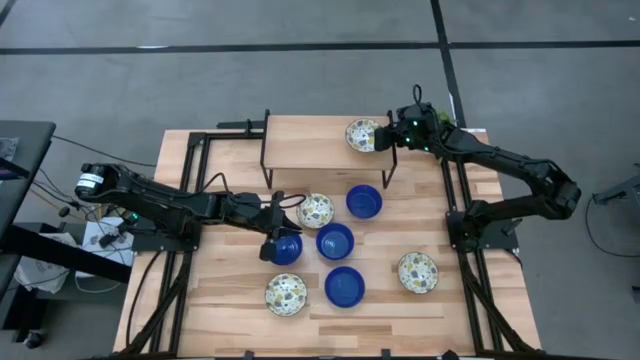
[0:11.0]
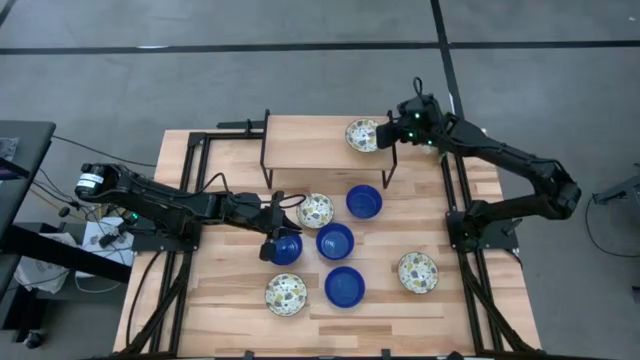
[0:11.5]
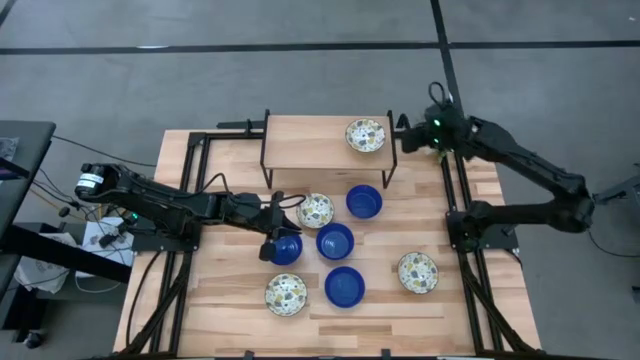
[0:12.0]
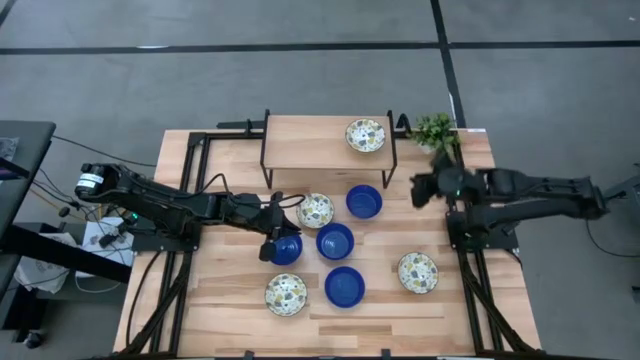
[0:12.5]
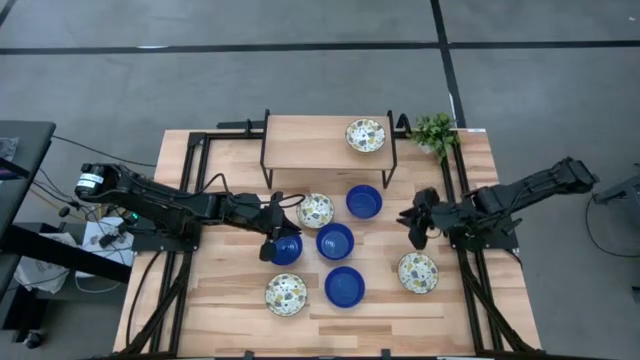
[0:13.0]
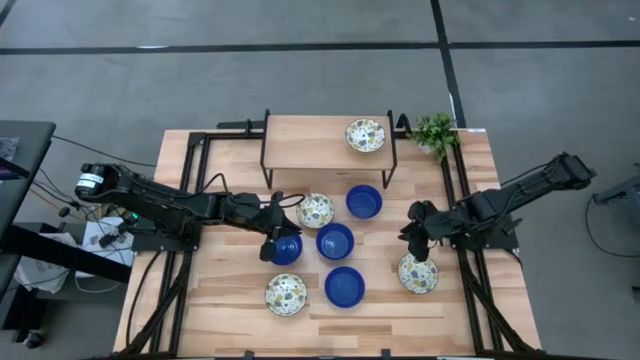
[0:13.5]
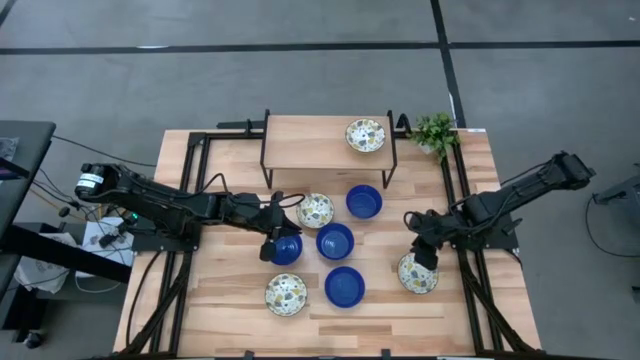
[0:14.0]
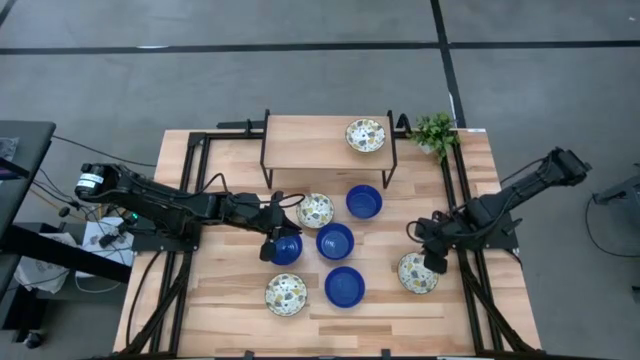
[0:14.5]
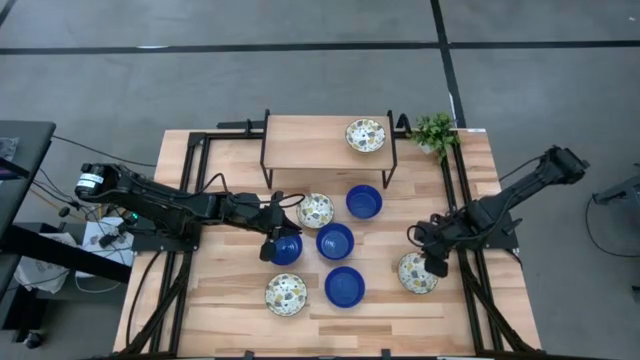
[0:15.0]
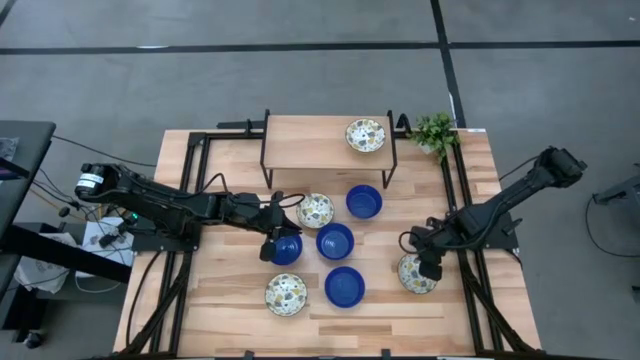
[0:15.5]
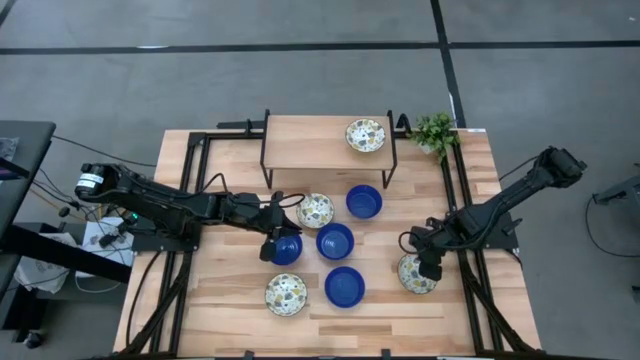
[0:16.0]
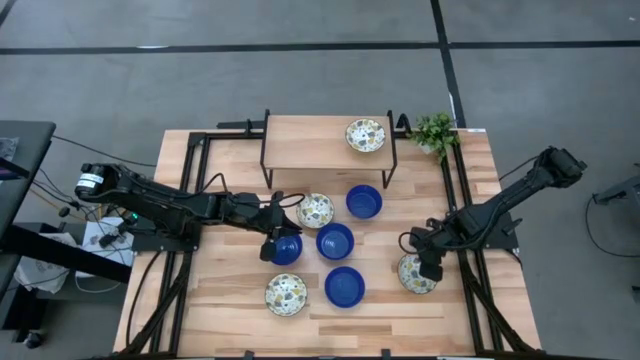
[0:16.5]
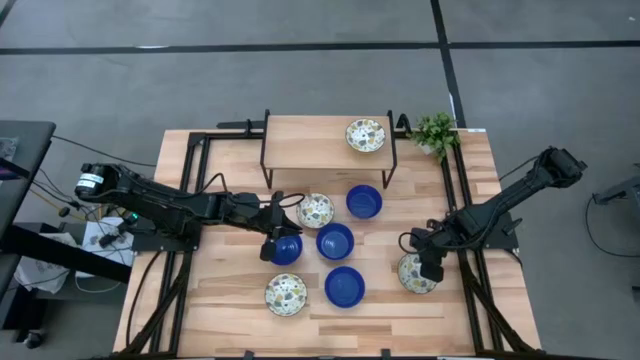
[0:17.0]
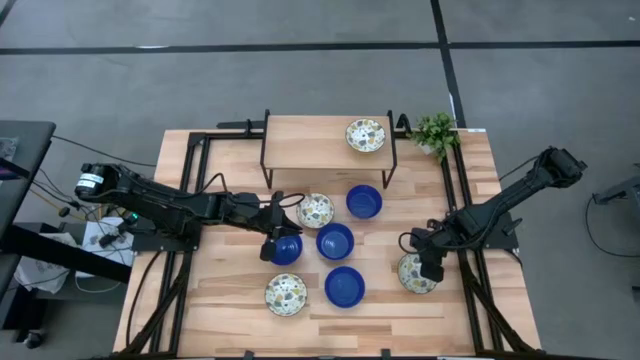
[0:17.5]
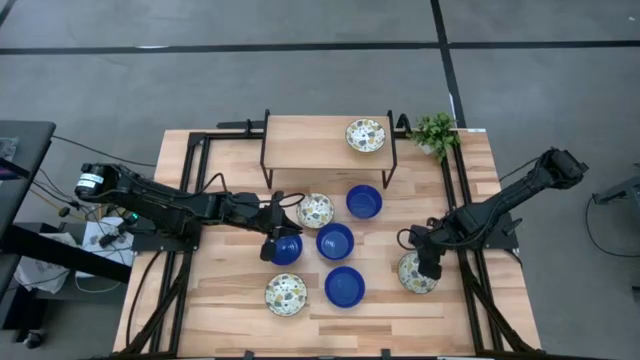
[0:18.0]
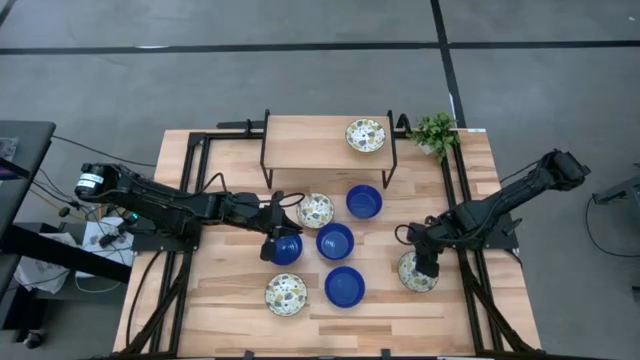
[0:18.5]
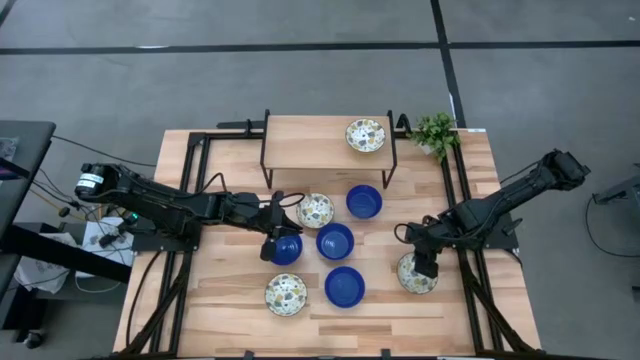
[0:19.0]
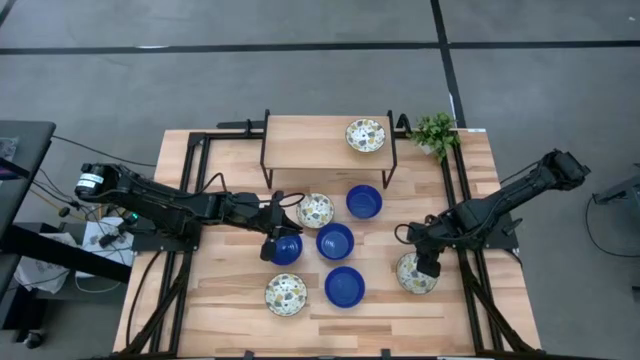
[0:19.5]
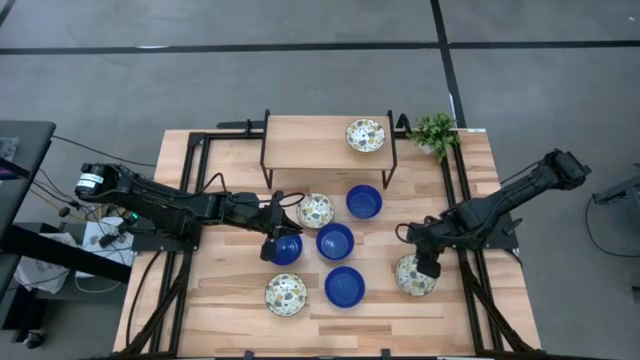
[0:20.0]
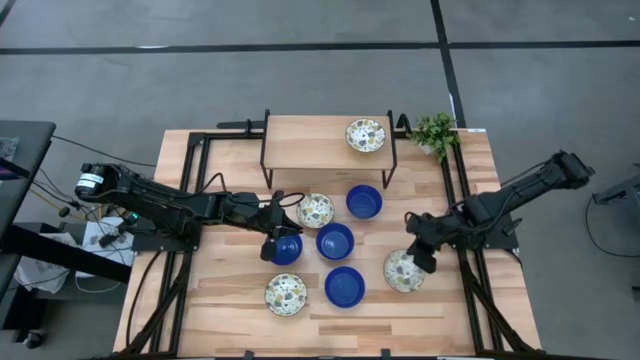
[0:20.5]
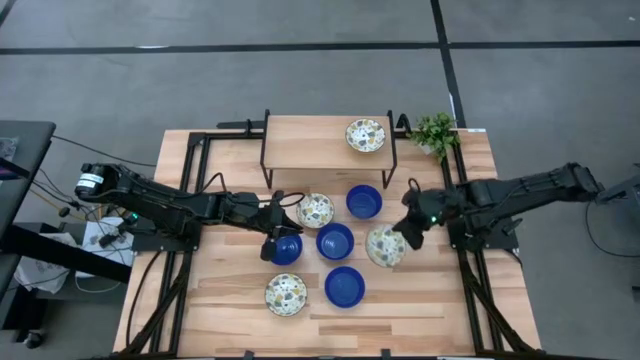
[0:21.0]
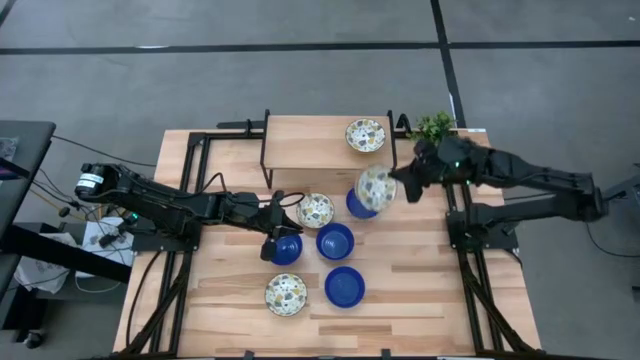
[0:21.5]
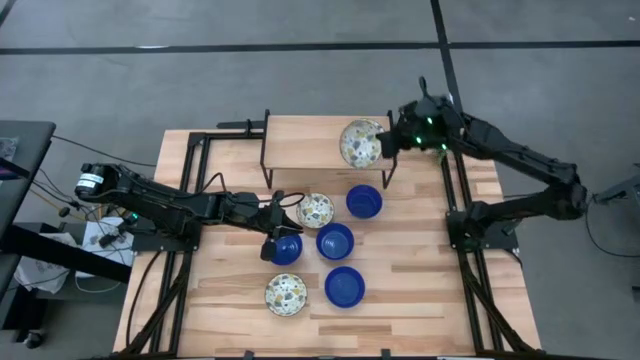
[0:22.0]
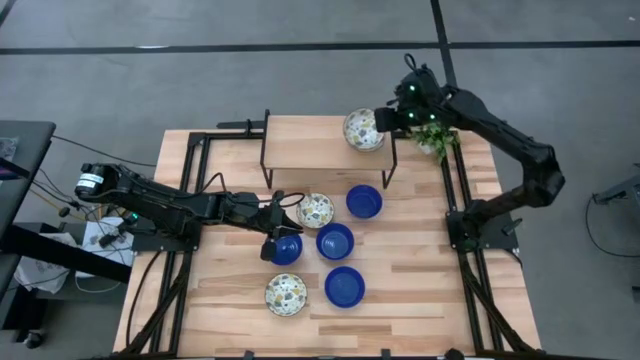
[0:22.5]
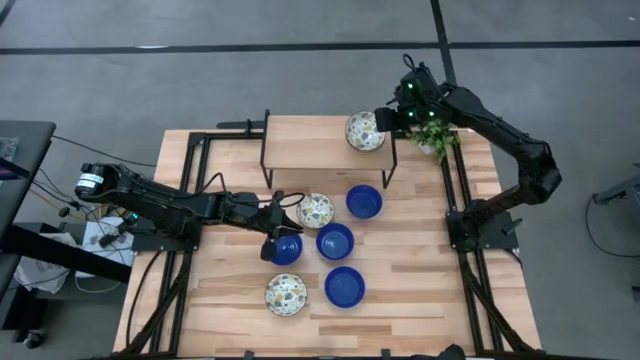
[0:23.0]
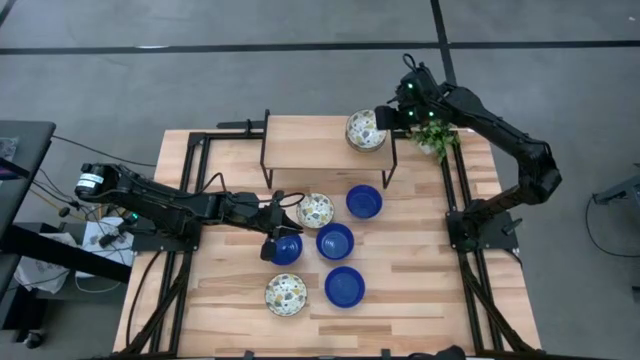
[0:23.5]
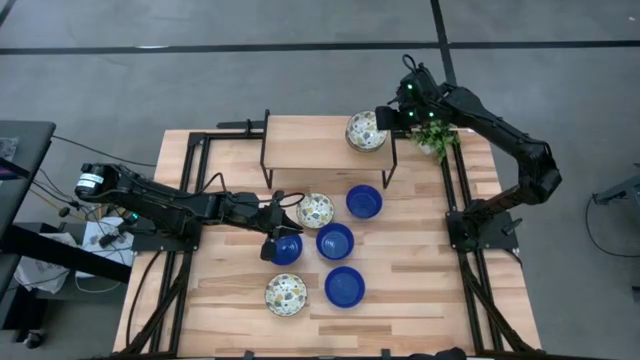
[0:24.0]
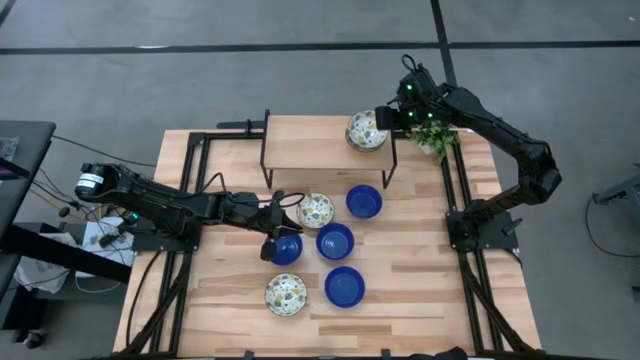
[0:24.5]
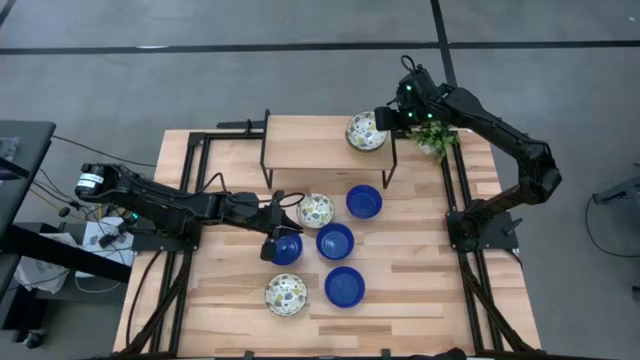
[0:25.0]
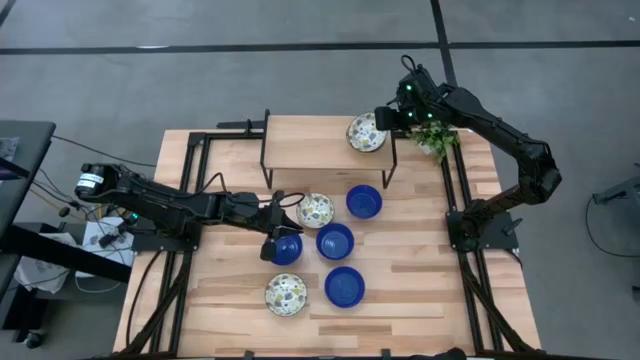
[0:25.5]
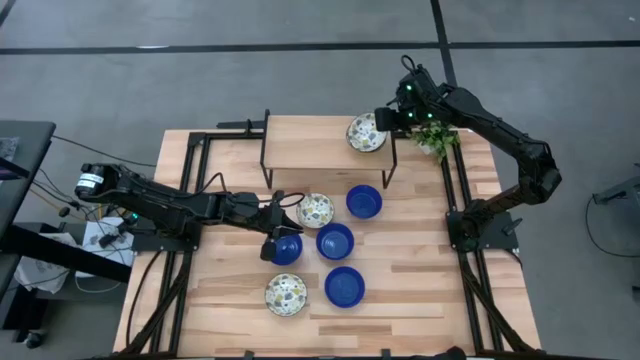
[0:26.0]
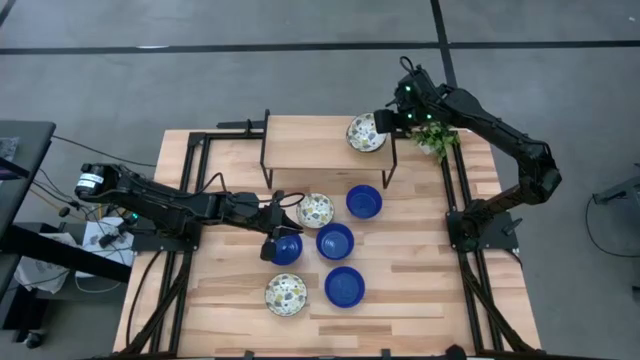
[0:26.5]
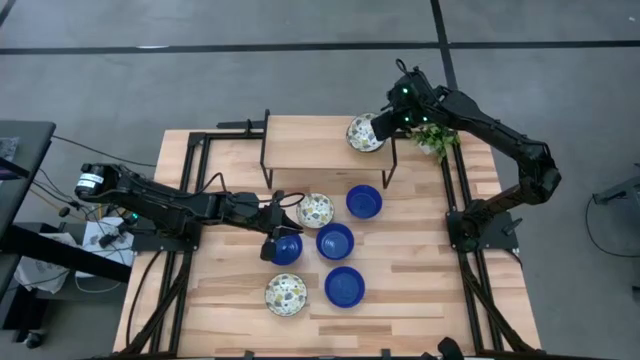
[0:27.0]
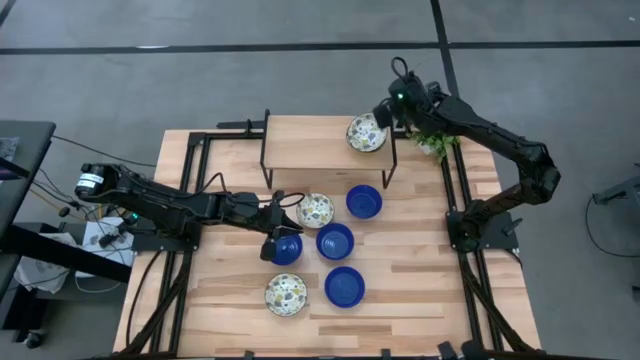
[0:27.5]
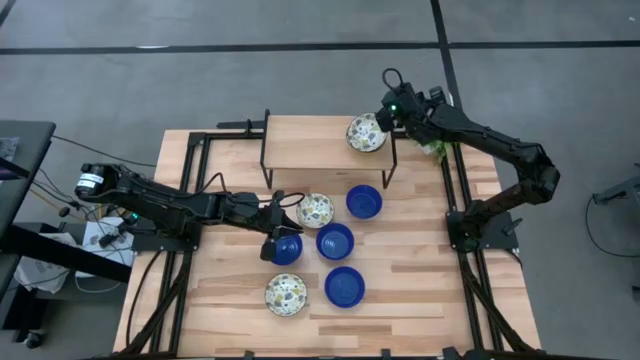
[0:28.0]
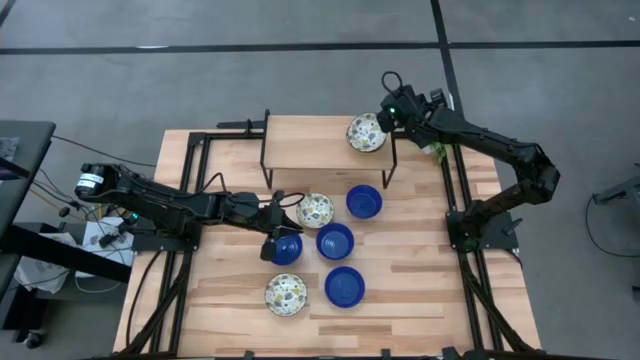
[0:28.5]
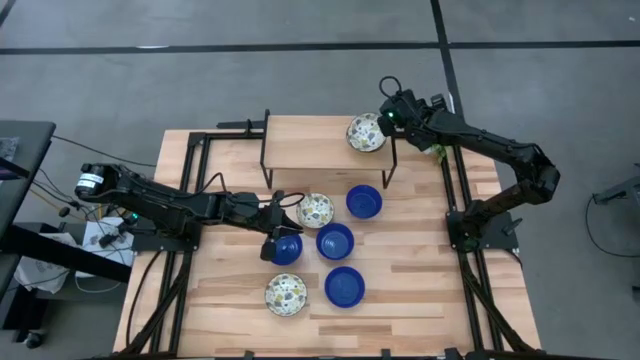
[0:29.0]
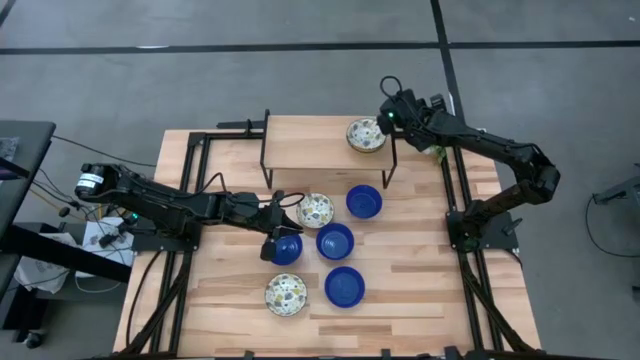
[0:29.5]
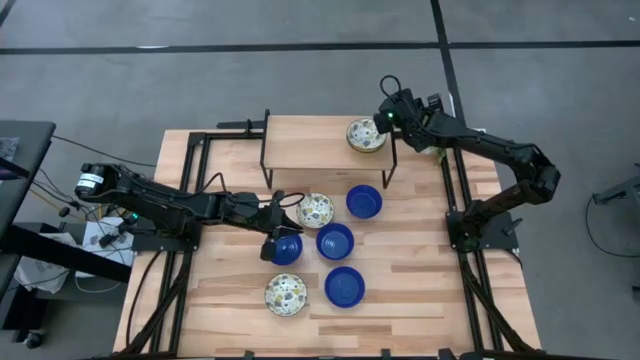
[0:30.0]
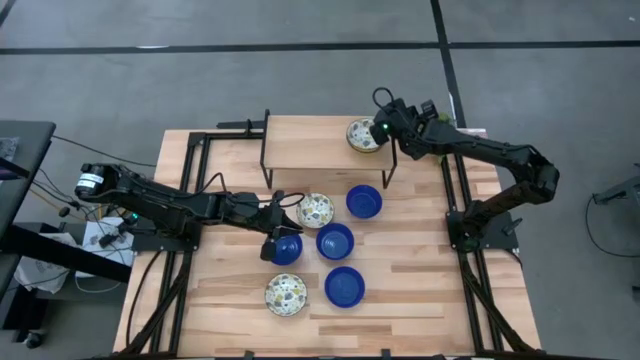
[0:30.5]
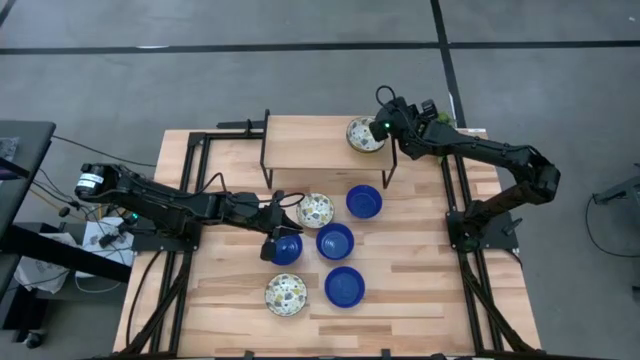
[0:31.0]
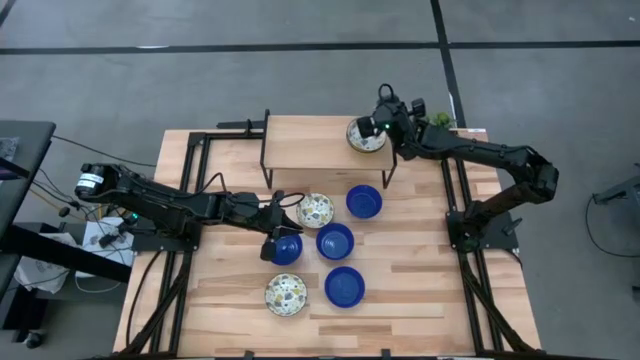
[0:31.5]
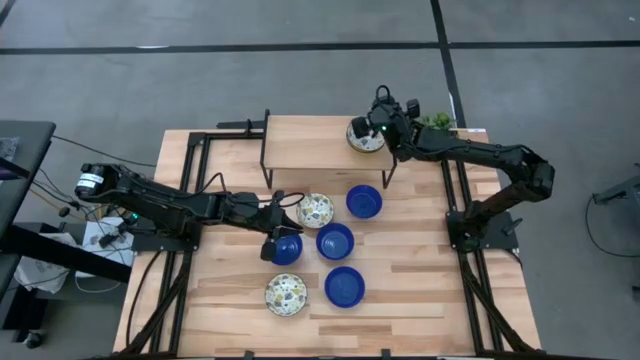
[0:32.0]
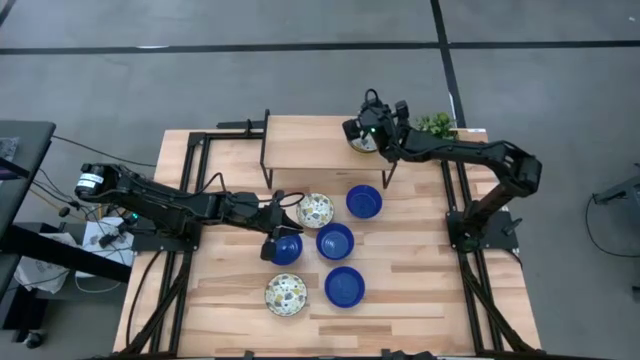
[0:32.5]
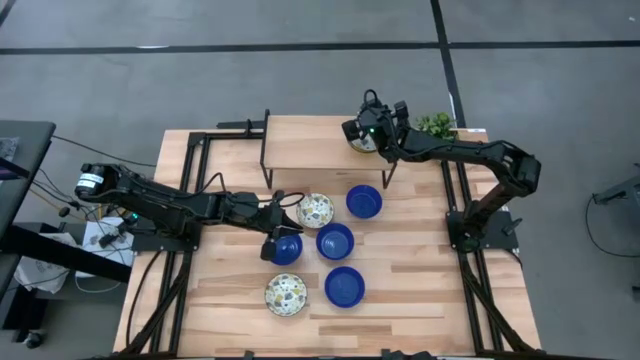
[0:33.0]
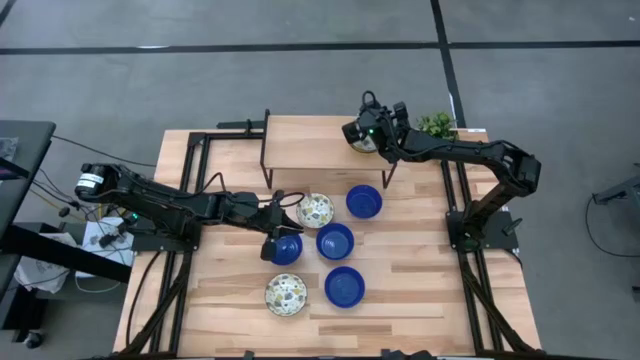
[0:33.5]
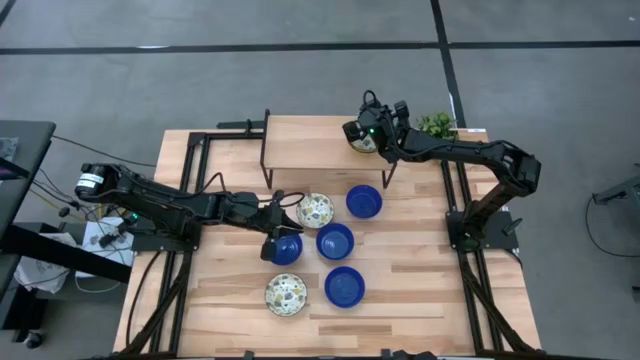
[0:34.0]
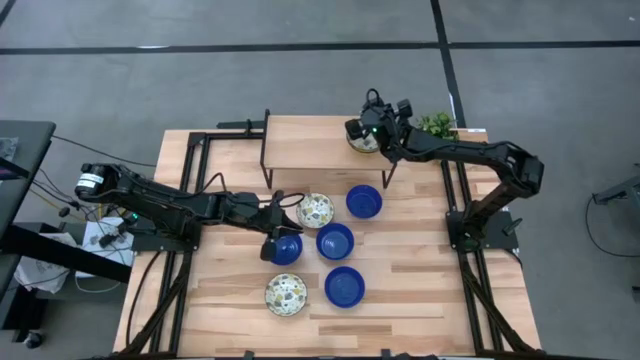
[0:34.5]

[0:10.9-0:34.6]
Task: Pick & Place Mini bowls
Stack the yellow patterned bowl on top of the yellow patterned bowl on the shelf
